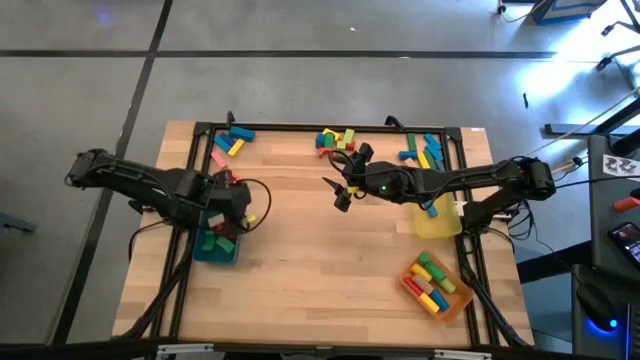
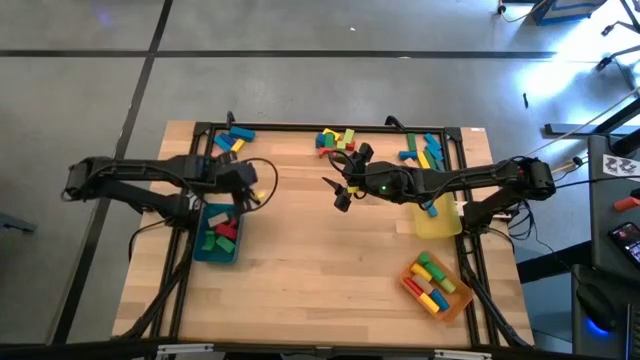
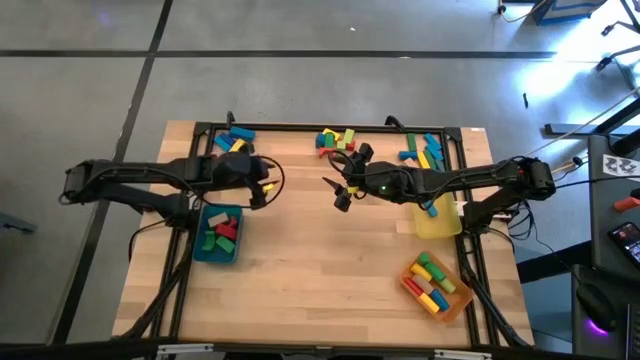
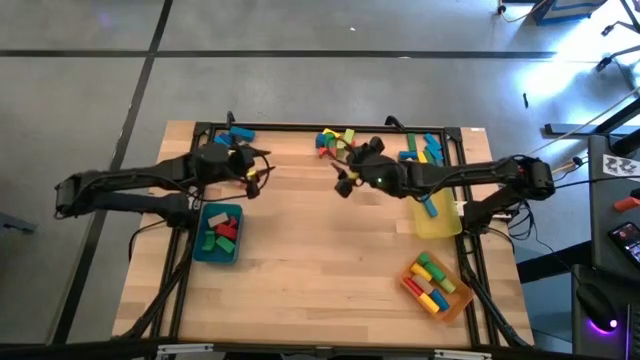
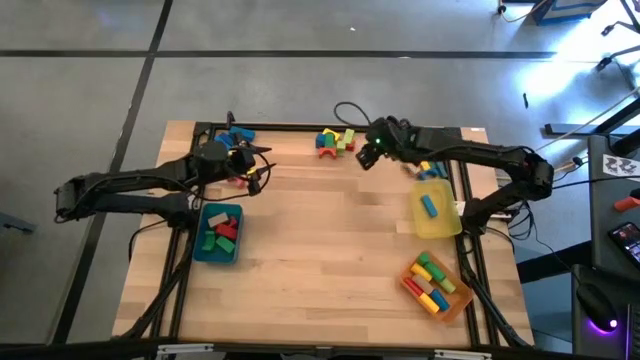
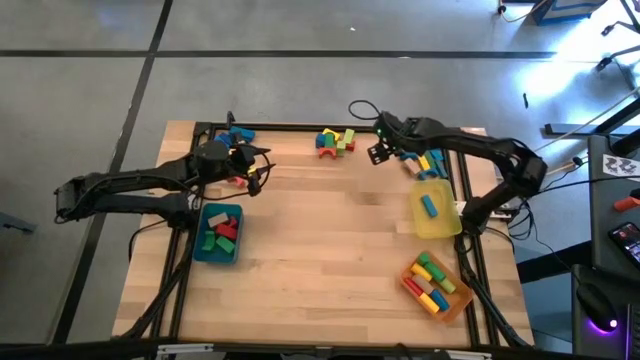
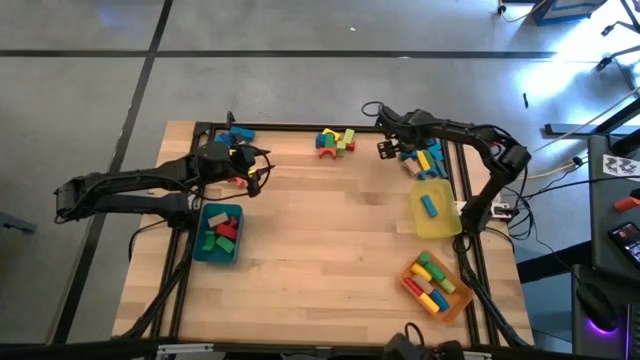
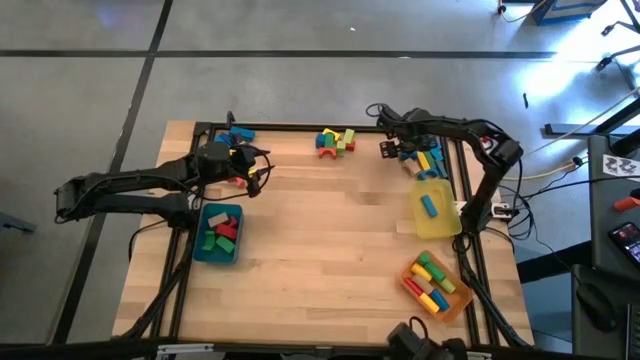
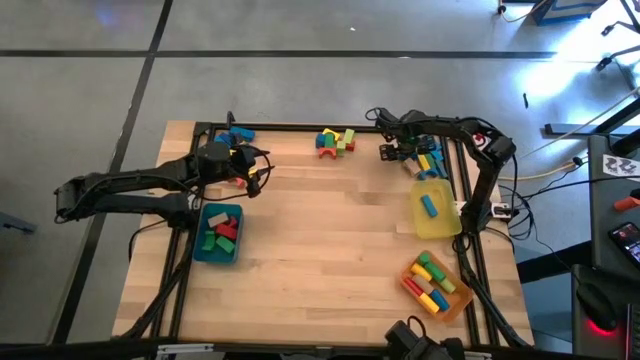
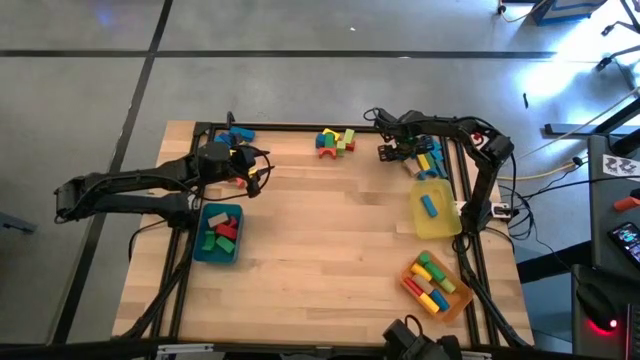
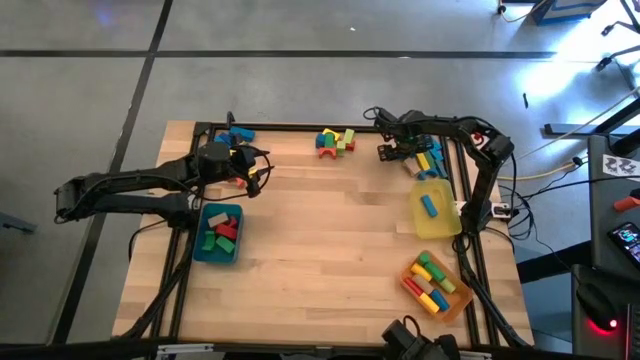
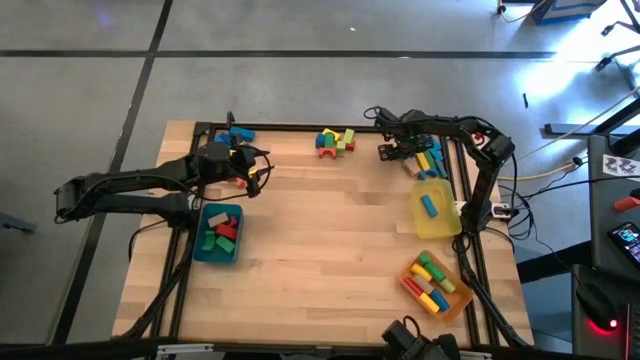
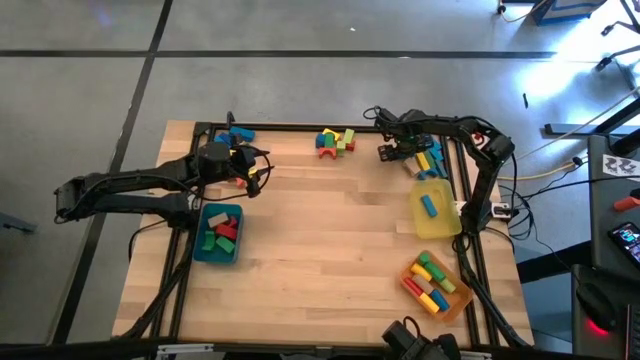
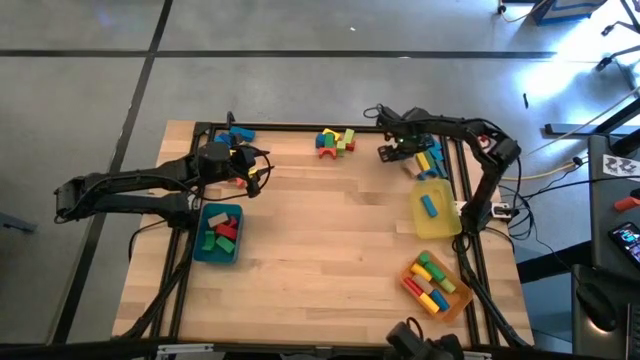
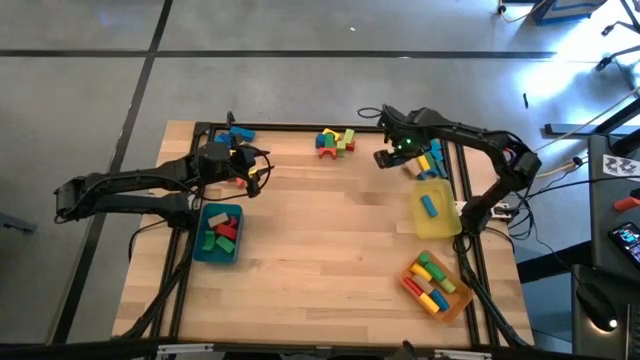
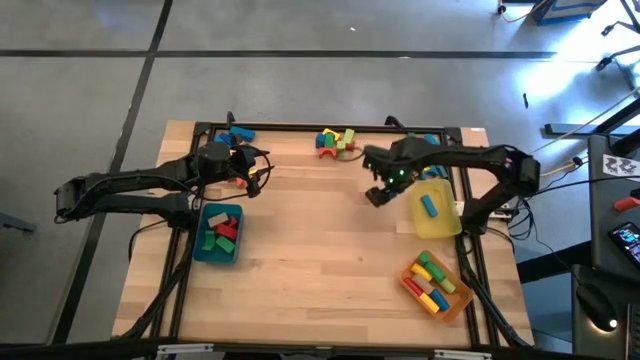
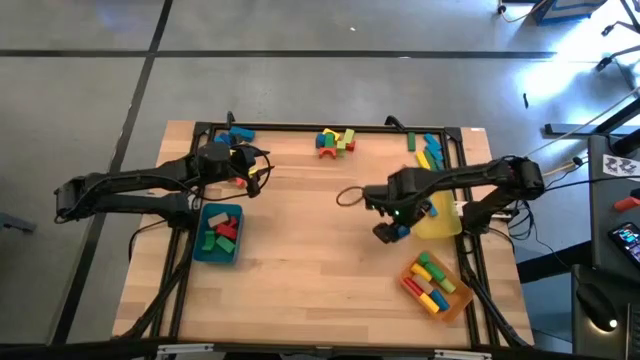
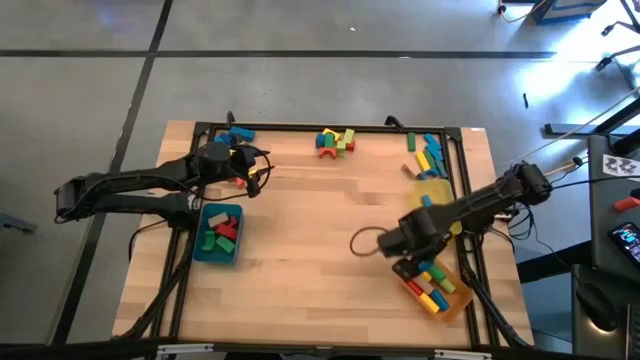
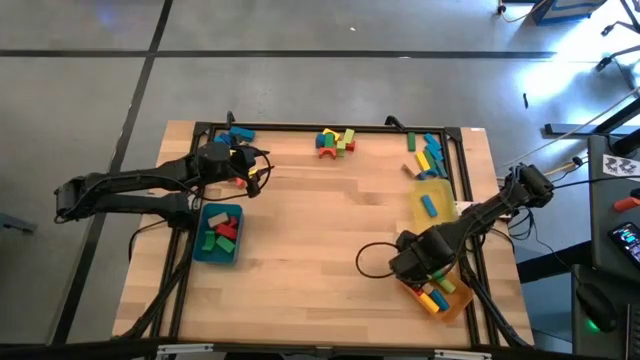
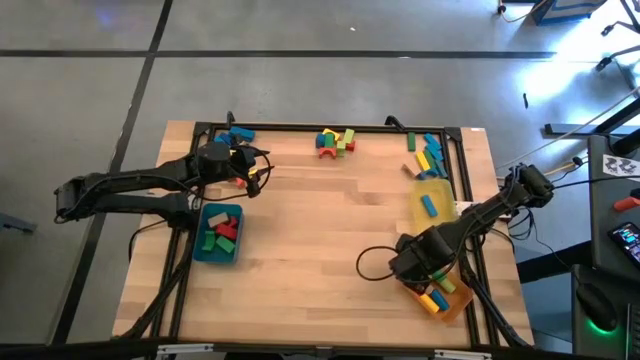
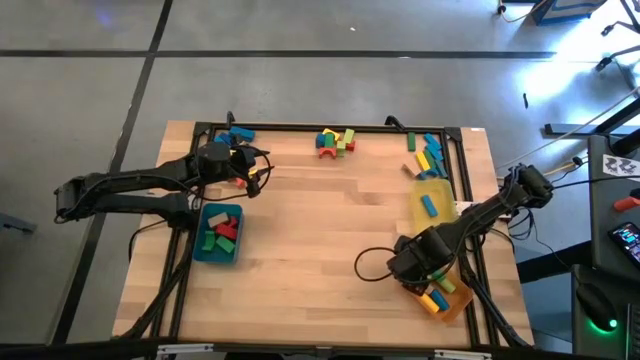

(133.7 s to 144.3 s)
Task: Sort blocks by size
Put the blue cylindrical block into the orange bin

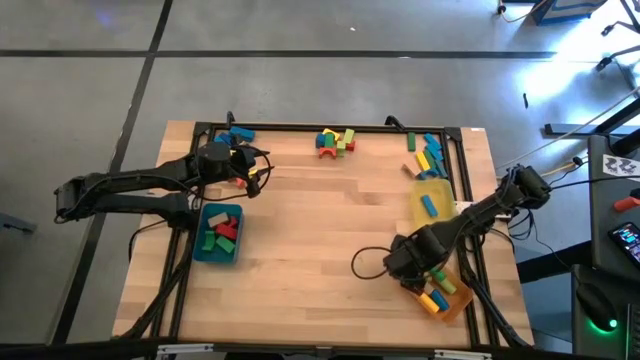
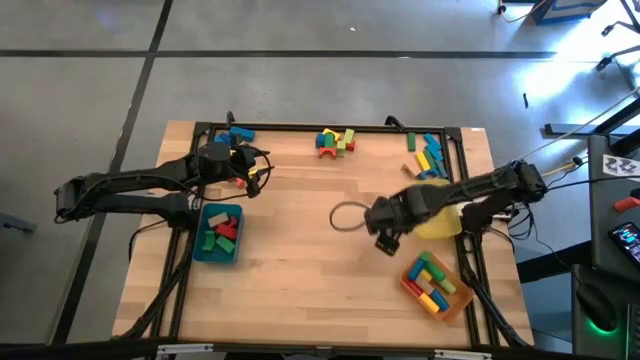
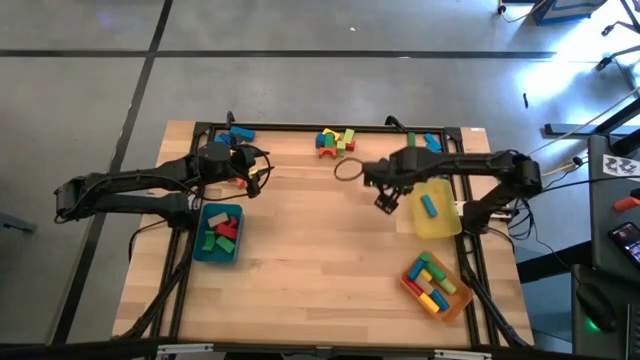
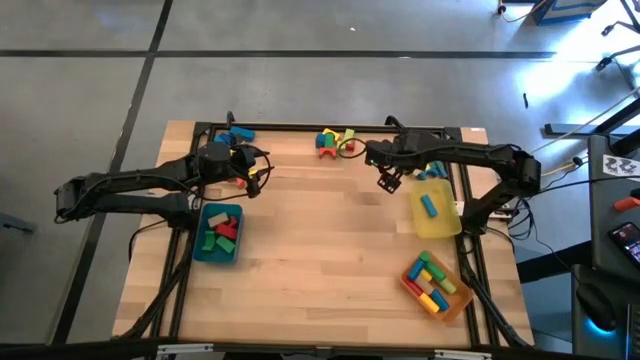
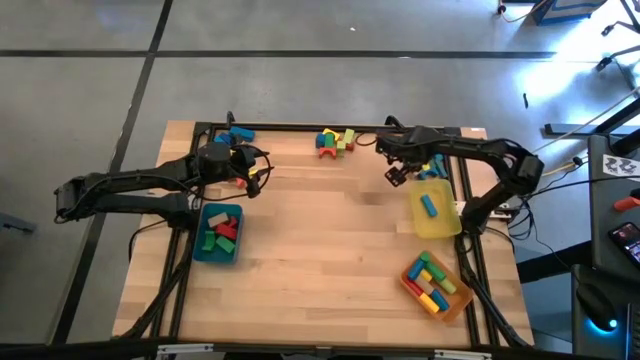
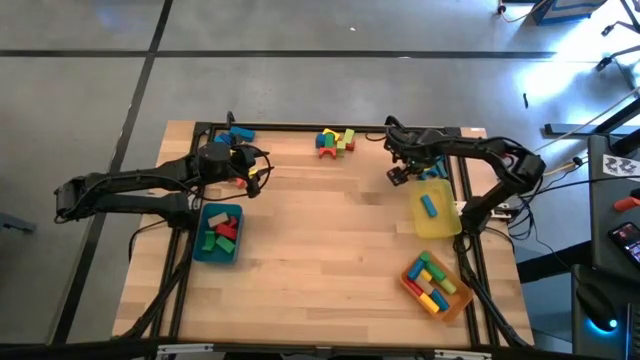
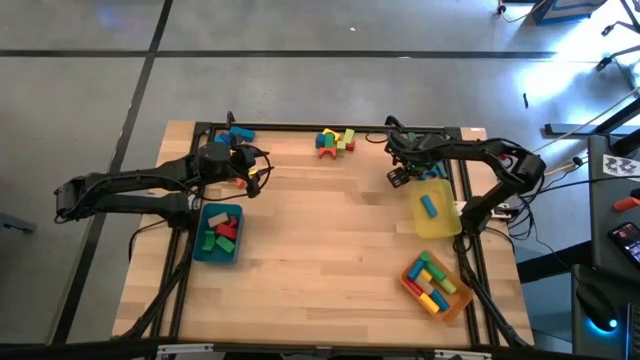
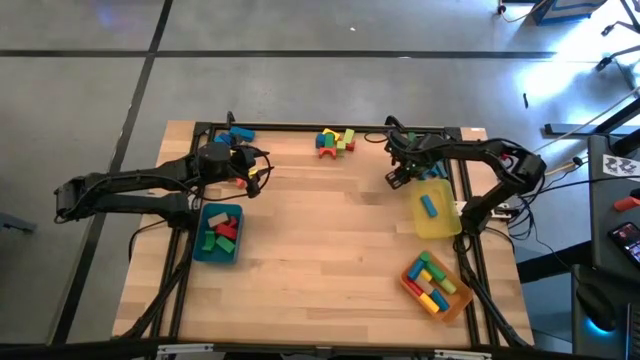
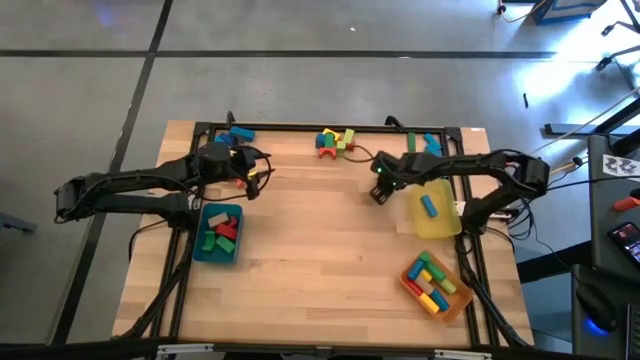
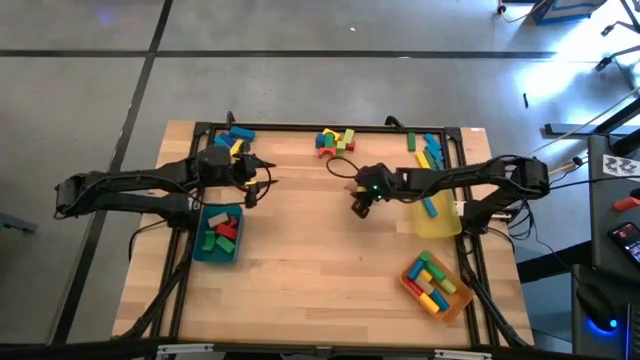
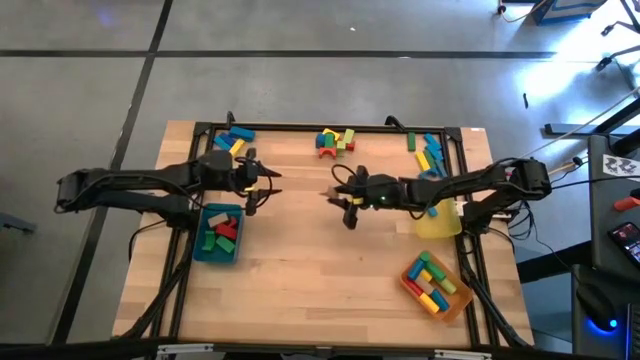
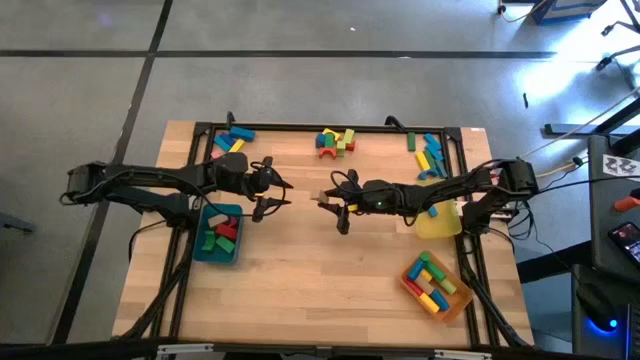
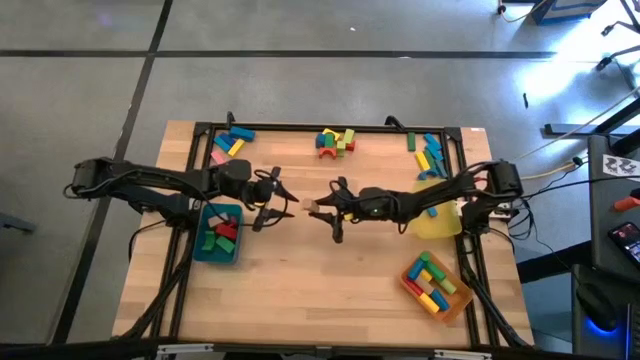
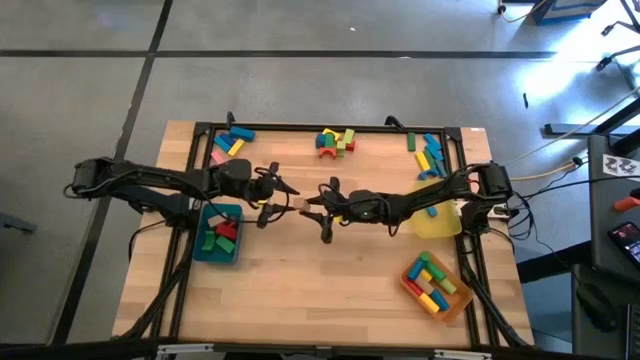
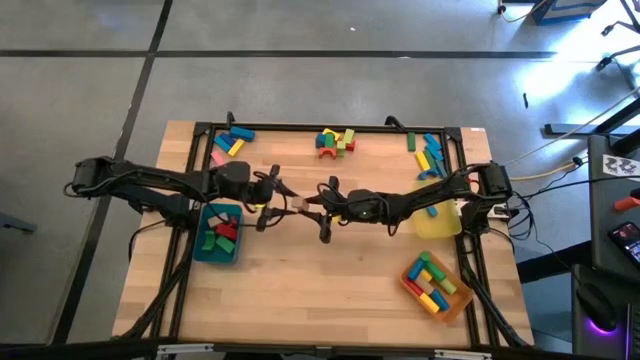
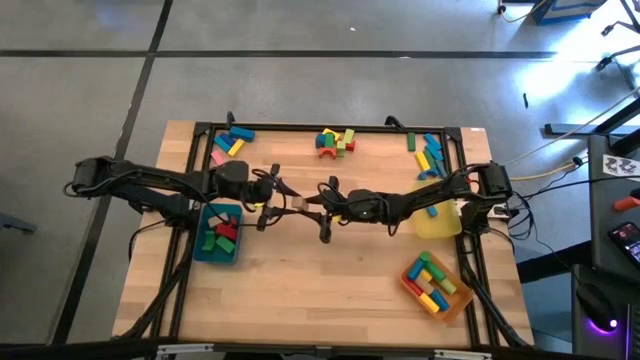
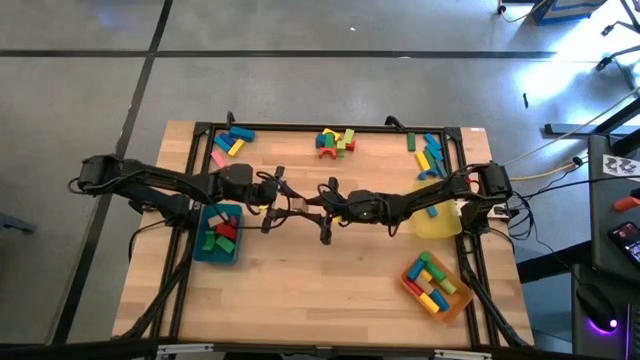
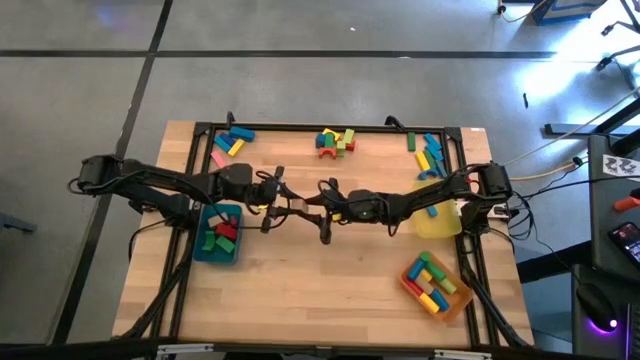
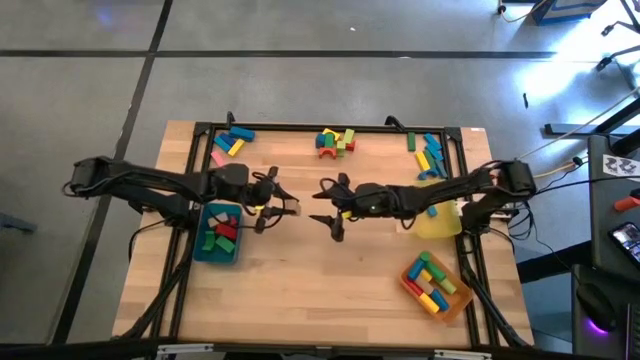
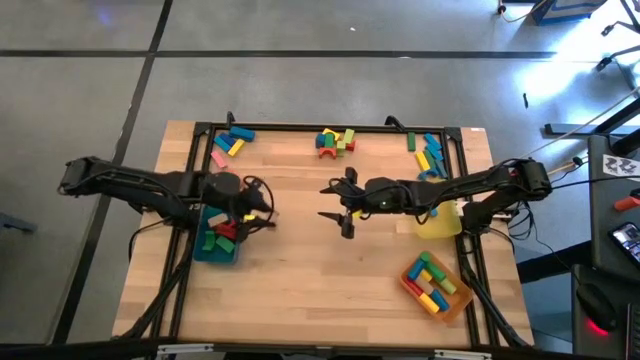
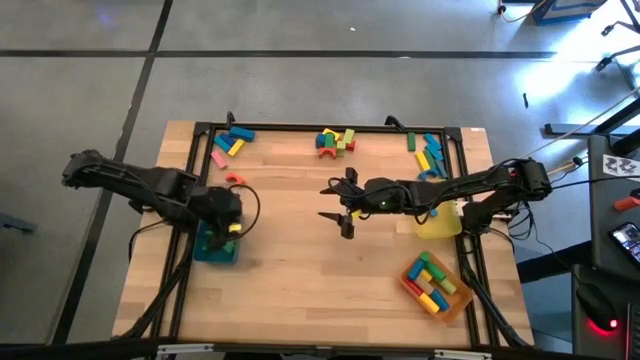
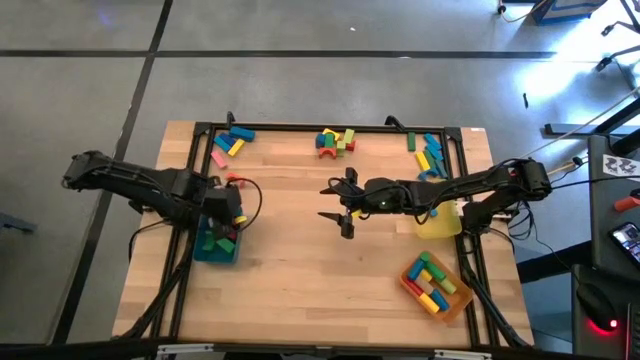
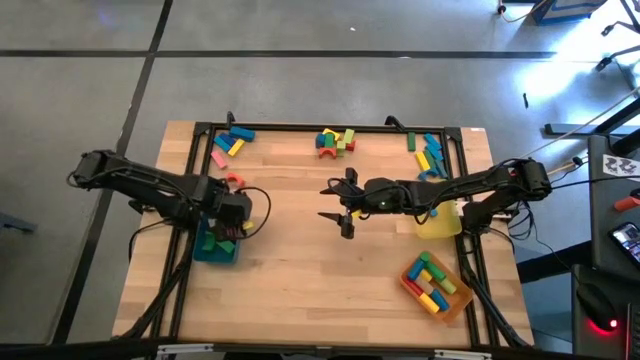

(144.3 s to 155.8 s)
Put the brown arch block into the blue bin
